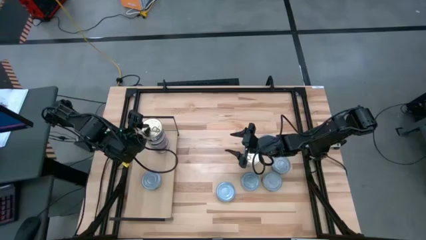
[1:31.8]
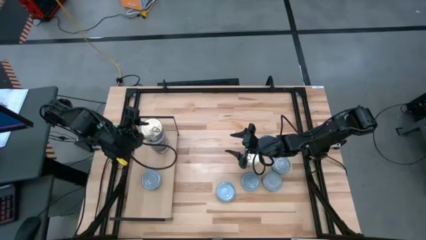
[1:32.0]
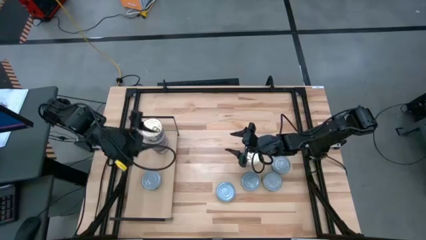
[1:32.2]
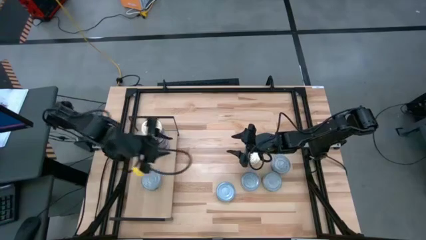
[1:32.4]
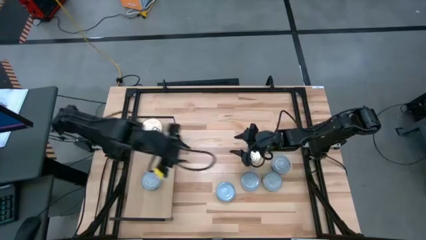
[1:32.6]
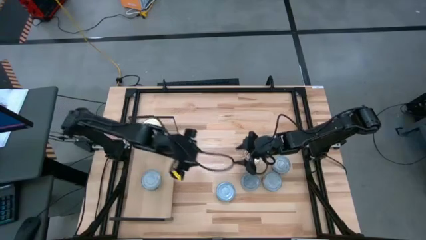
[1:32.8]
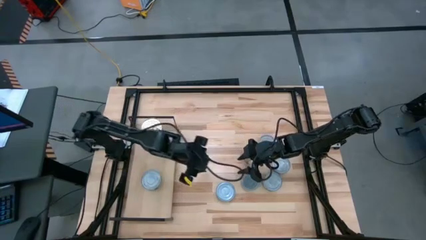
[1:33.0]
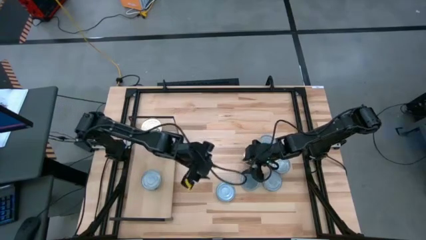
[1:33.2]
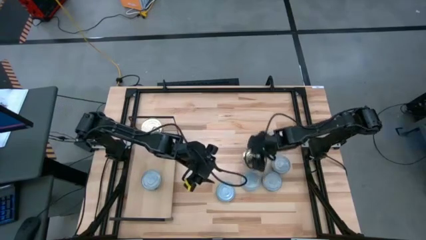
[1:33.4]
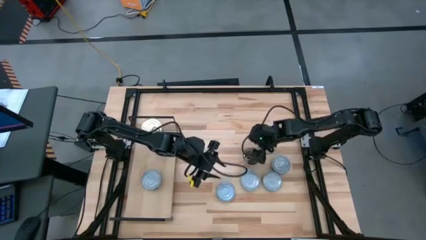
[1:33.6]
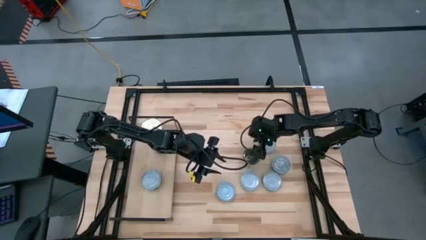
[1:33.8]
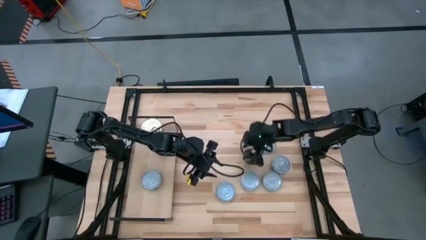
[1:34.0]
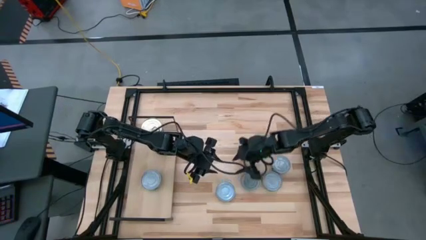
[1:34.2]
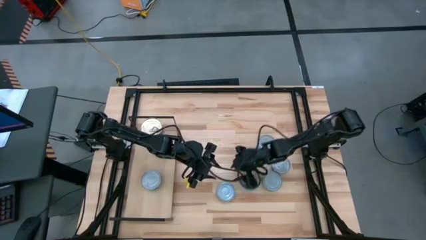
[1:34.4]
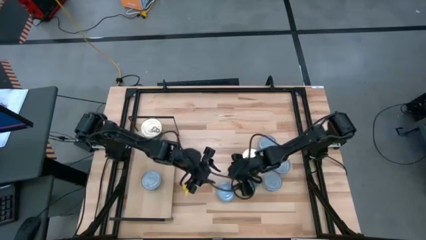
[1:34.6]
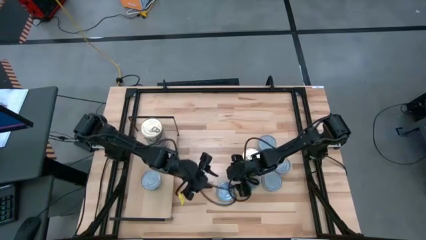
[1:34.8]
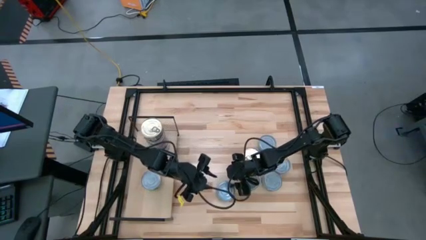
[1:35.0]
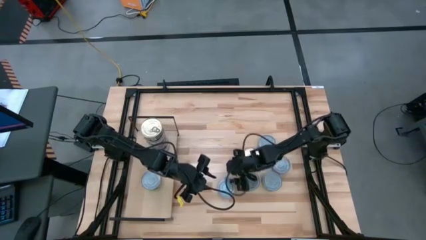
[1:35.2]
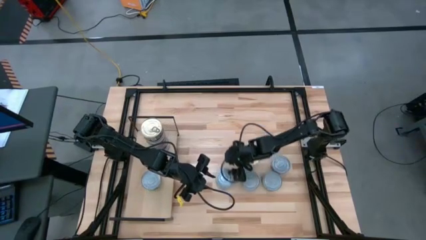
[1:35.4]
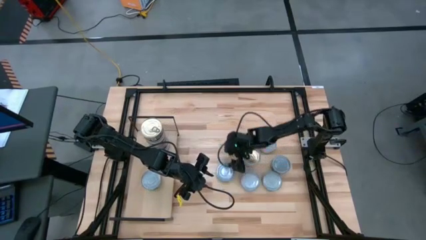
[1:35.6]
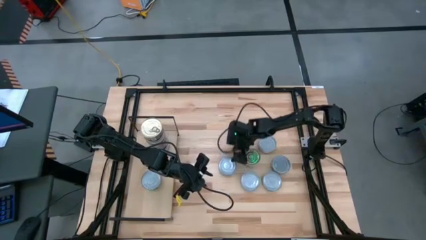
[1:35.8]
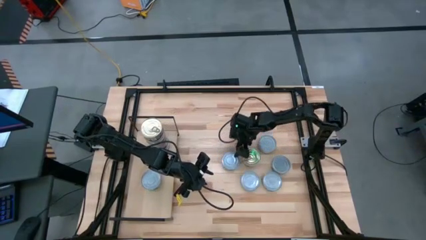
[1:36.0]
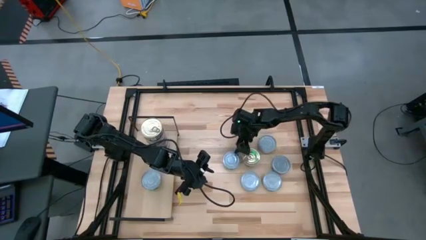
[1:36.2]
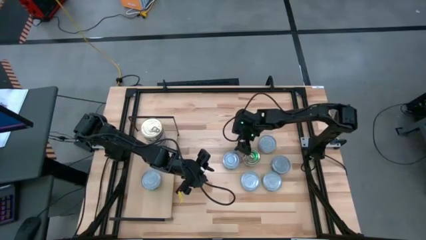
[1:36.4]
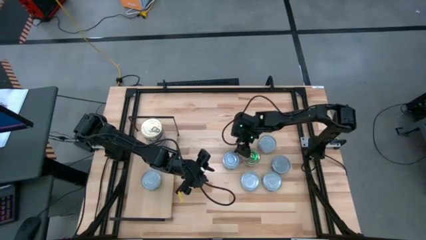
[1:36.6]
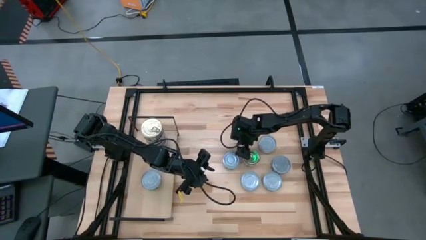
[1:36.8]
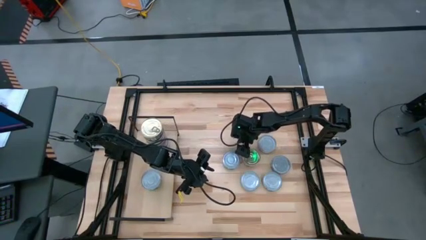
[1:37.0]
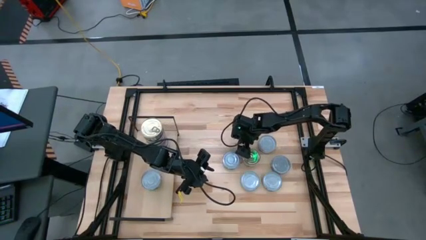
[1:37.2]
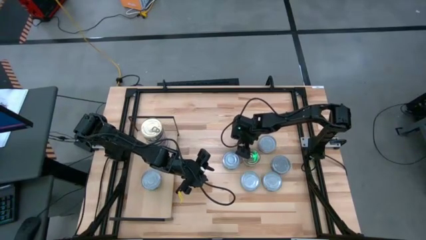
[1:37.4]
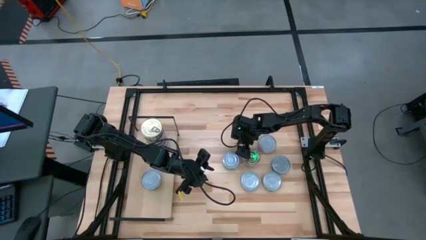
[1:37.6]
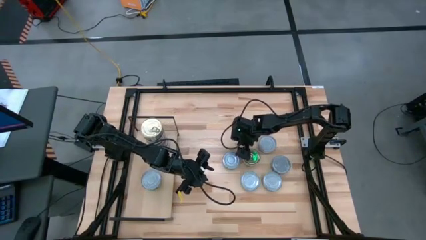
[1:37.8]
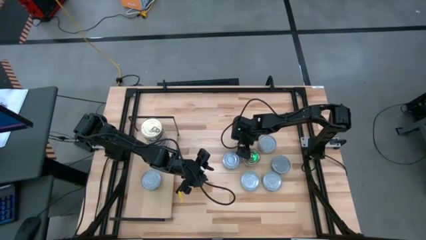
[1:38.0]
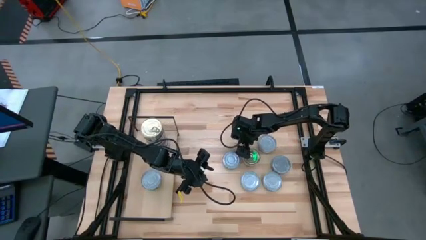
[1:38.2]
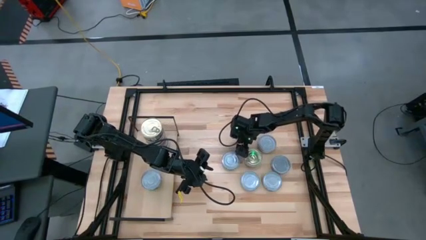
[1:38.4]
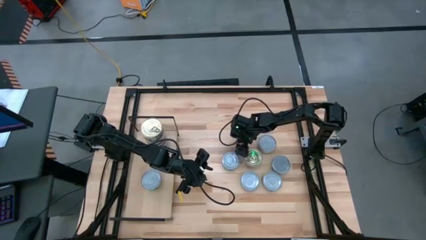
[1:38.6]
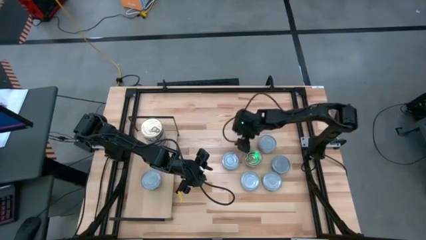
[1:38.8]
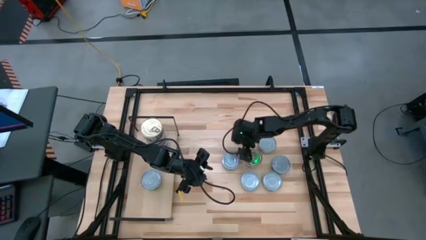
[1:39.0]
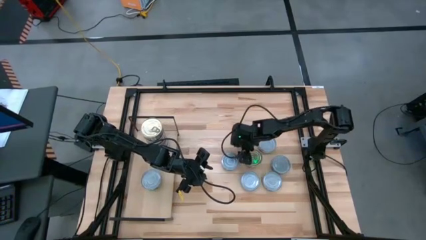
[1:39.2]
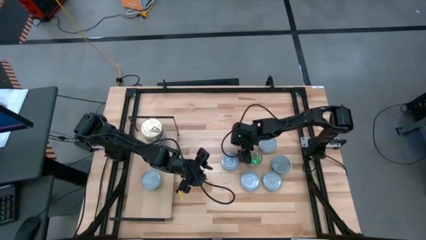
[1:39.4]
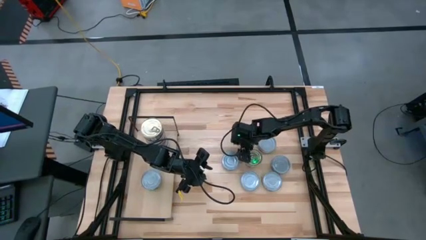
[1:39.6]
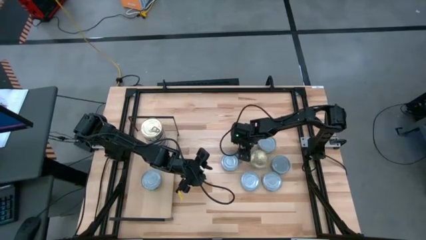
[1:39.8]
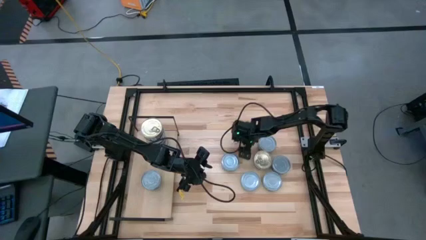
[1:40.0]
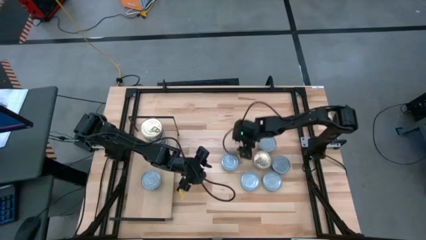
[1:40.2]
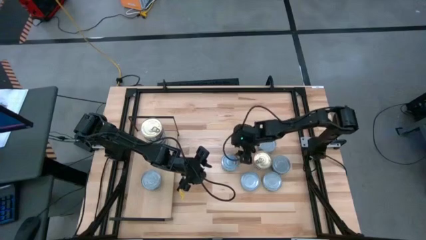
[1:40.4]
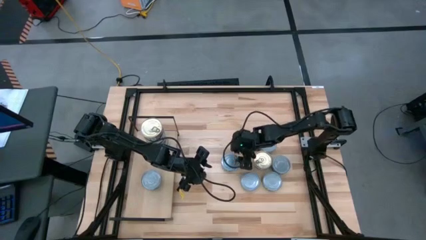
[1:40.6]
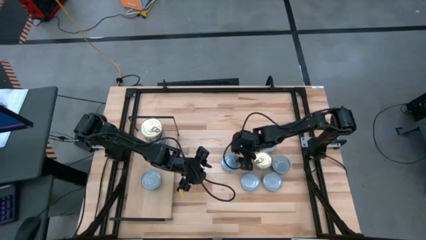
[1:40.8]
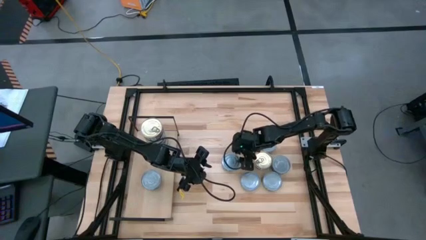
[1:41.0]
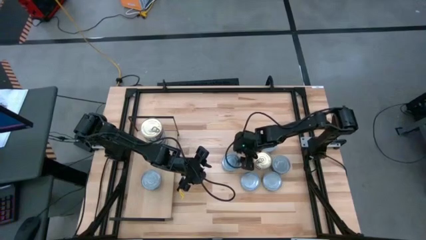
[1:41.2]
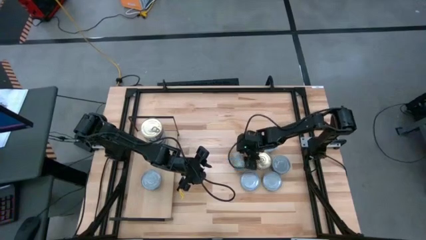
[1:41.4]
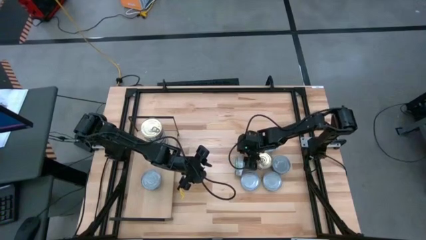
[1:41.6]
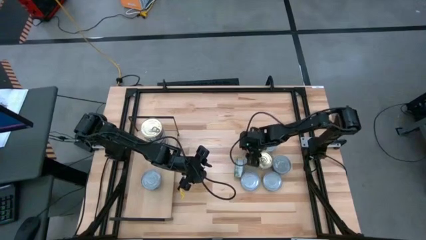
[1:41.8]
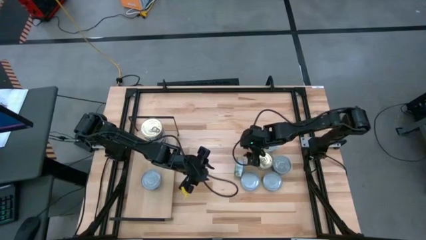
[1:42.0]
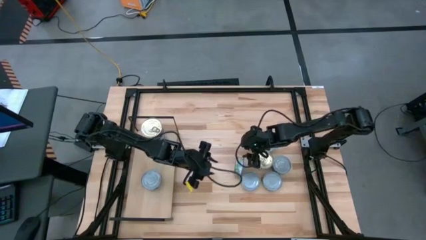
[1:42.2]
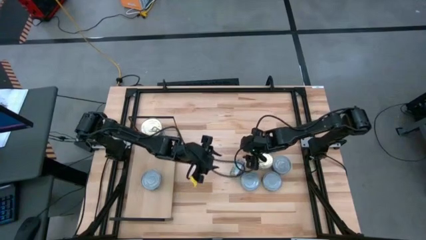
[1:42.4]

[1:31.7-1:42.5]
Task: Stack canned seafood by type on shelf
Stack the green and white tuna can on the green and white tuna can on the shelf

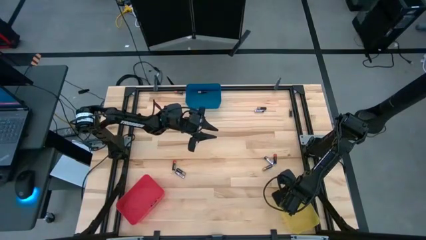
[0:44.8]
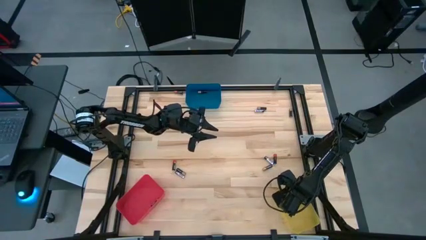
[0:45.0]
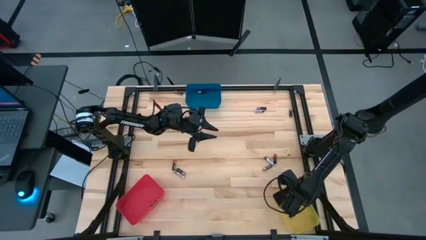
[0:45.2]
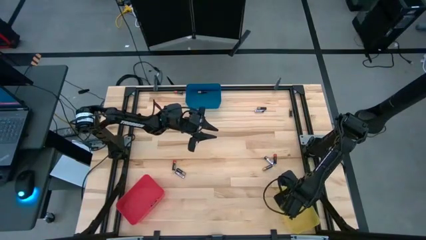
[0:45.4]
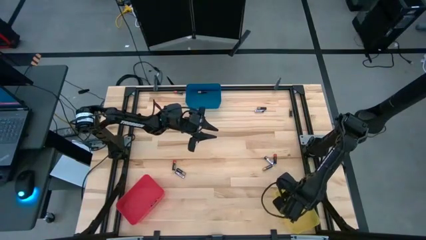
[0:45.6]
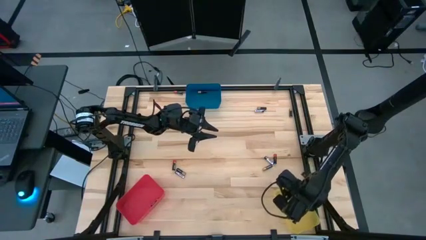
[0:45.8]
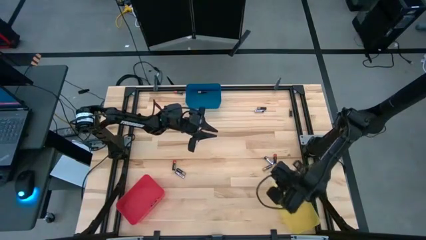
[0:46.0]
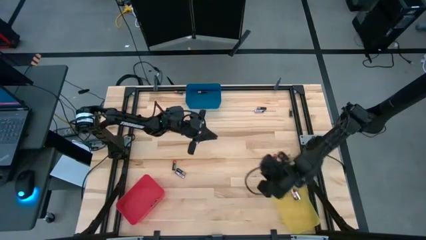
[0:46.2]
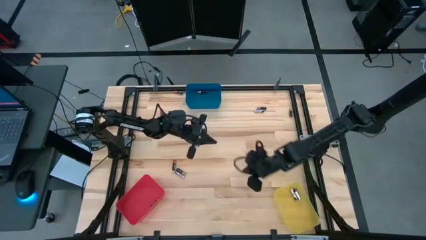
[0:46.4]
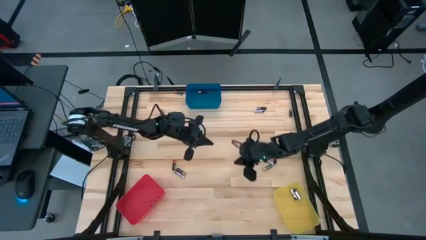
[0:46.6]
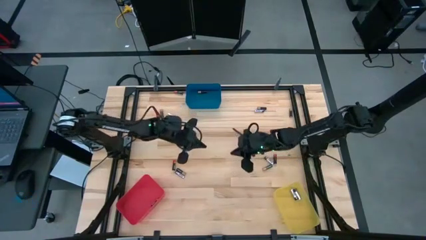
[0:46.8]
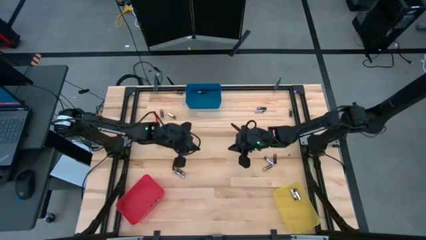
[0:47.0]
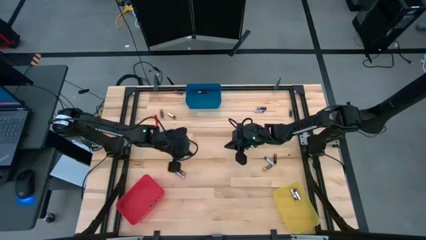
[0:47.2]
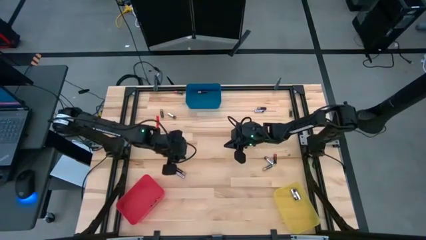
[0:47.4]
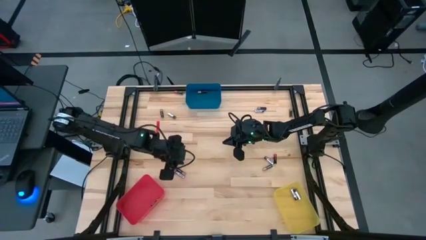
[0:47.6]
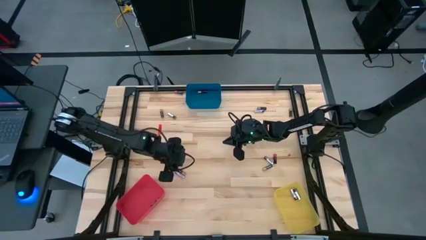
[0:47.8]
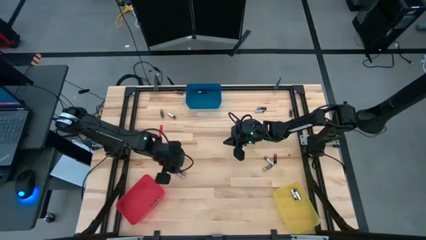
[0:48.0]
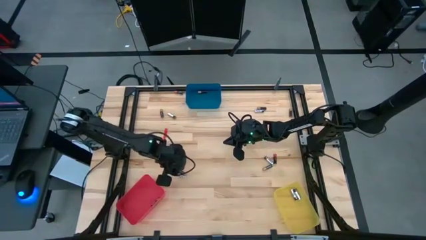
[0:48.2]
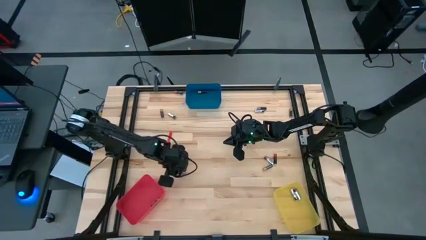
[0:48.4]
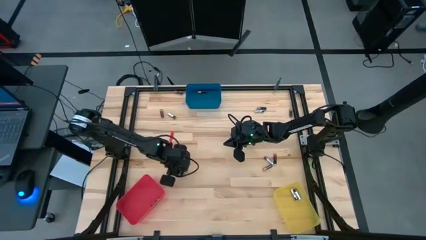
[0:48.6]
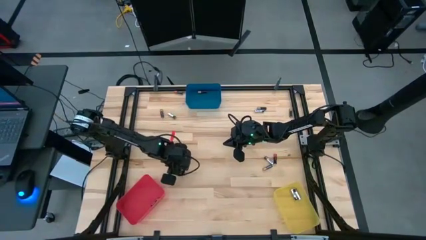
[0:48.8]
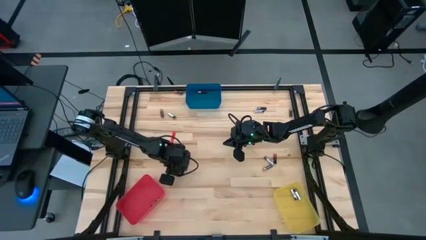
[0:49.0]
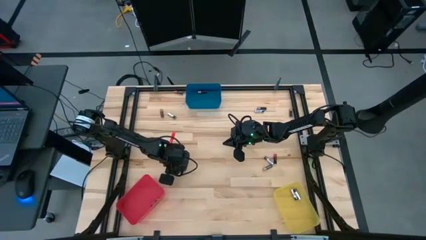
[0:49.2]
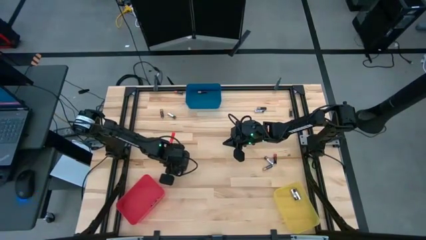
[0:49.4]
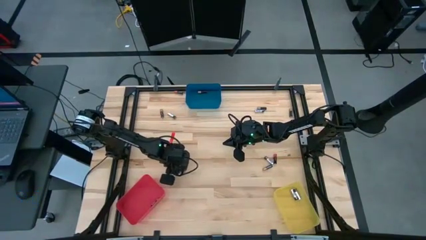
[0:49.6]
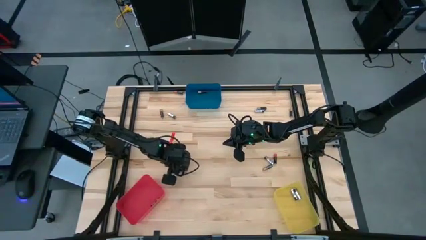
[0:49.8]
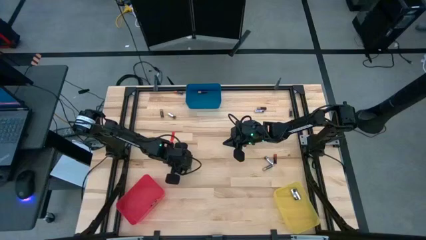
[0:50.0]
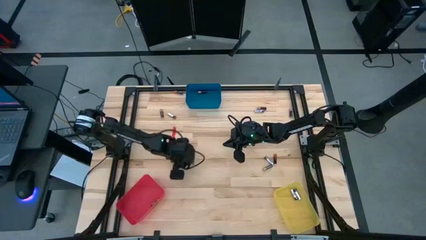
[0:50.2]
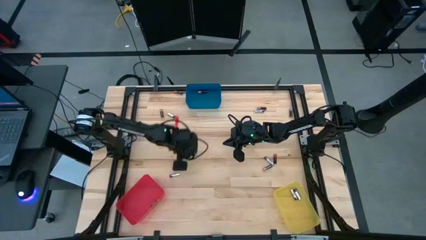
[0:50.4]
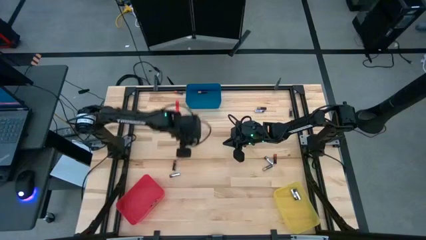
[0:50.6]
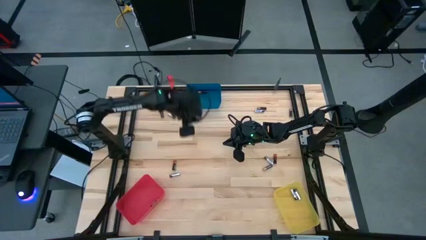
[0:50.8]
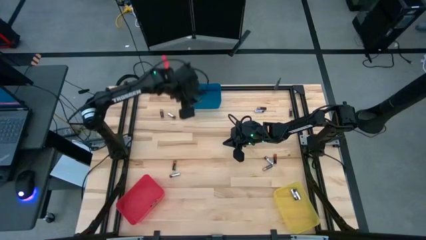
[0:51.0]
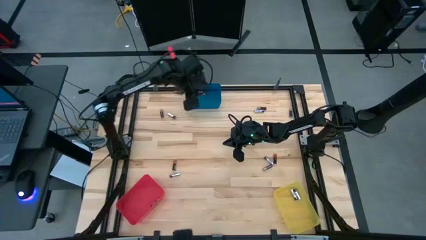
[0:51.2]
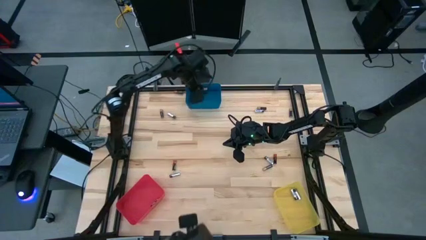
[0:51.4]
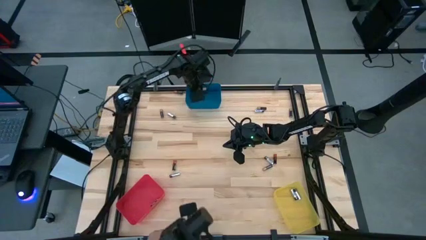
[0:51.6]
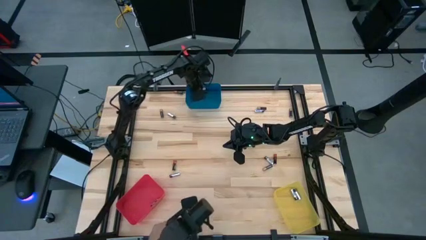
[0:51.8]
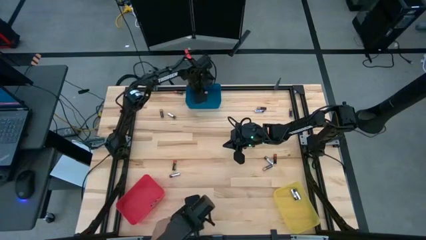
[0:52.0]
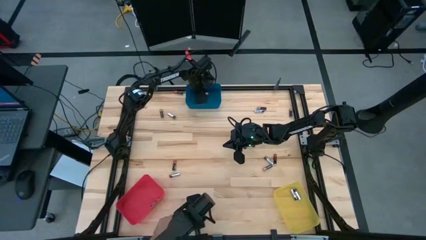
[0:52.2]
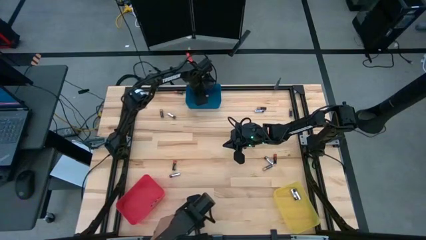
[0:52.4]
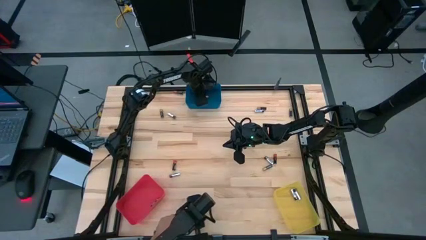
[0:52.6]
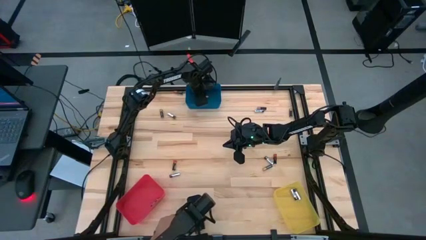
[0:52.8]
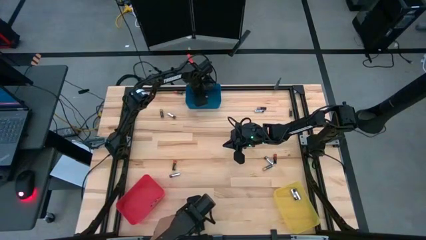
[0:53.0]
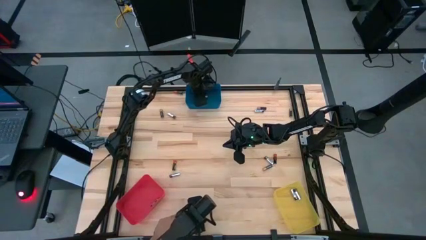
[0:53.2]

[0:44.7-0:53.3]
Task: Sort batteries
Put the black-brown battery into the blue bin
